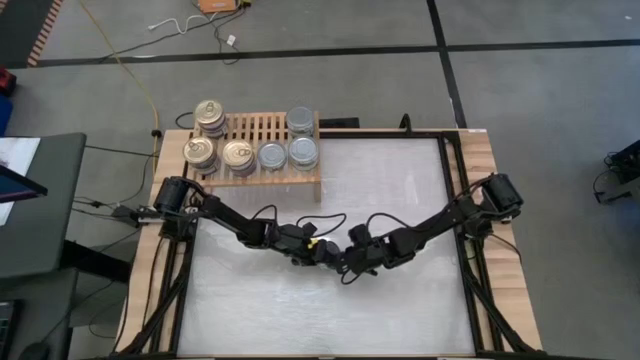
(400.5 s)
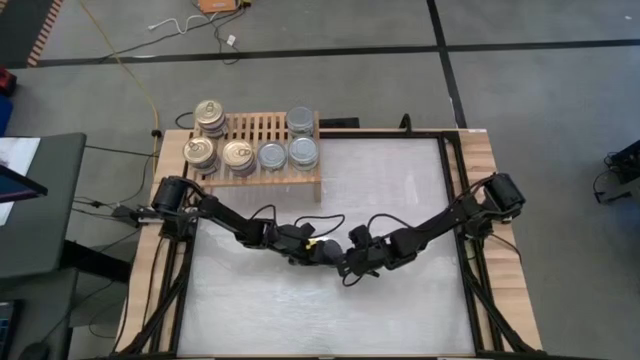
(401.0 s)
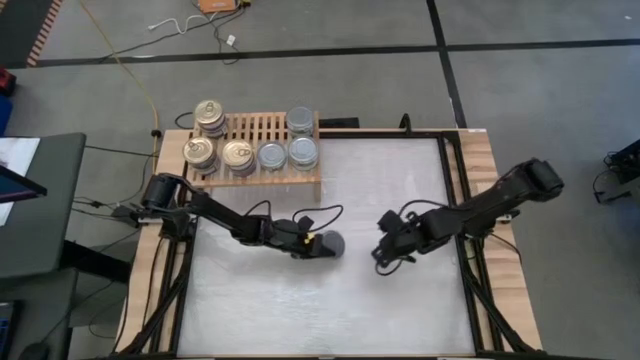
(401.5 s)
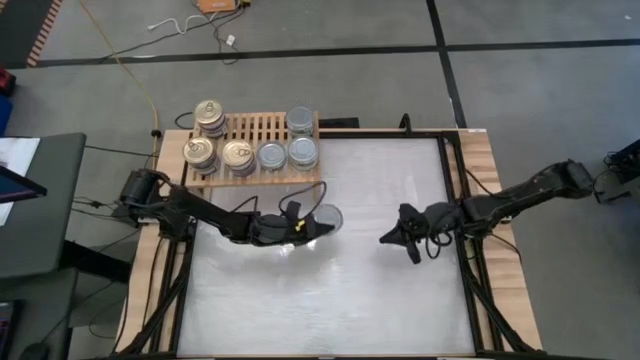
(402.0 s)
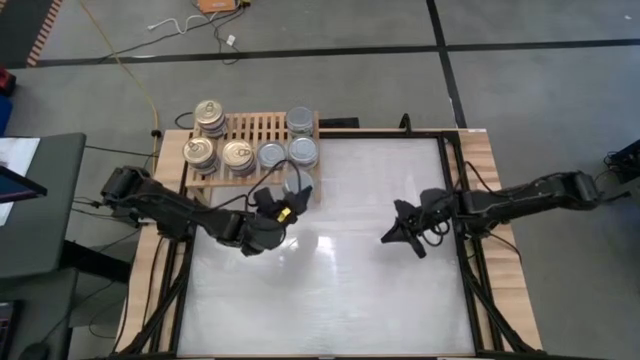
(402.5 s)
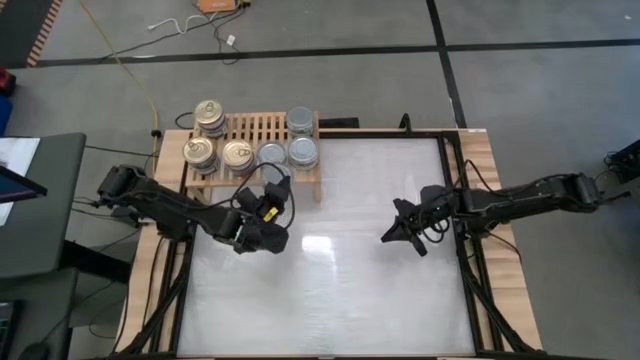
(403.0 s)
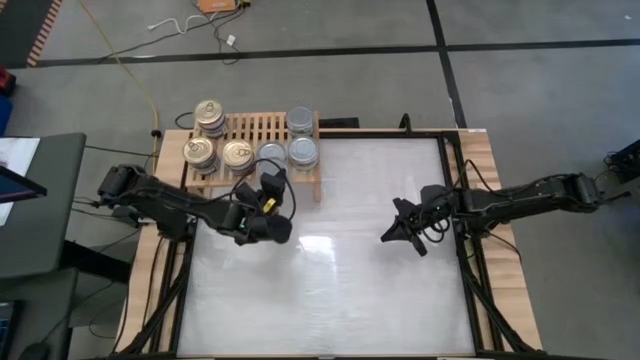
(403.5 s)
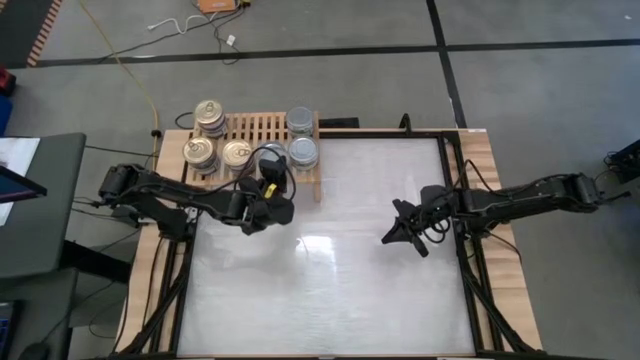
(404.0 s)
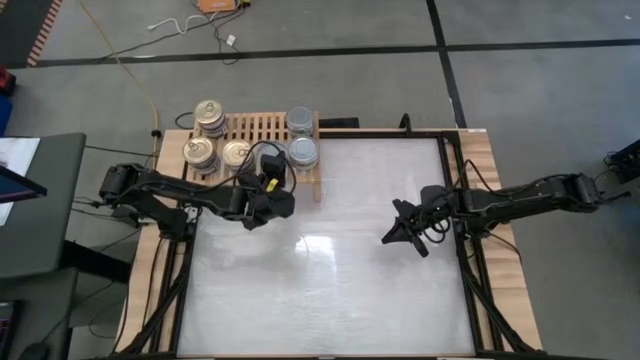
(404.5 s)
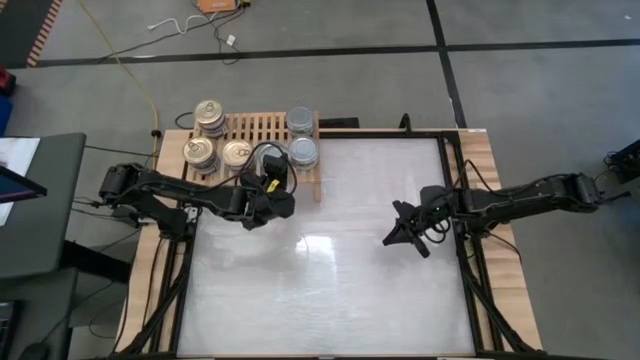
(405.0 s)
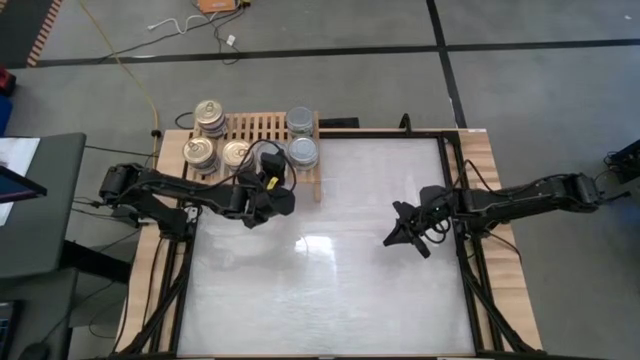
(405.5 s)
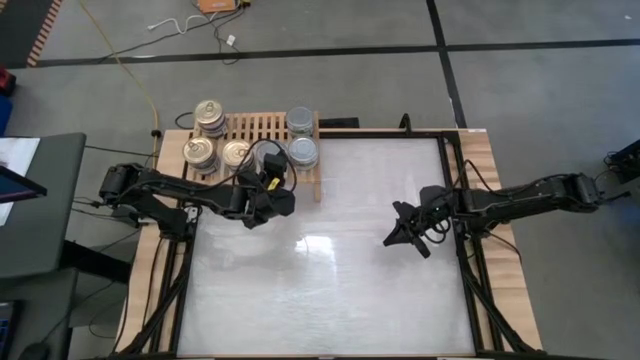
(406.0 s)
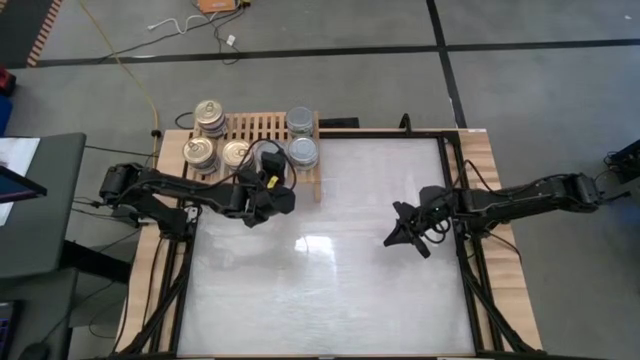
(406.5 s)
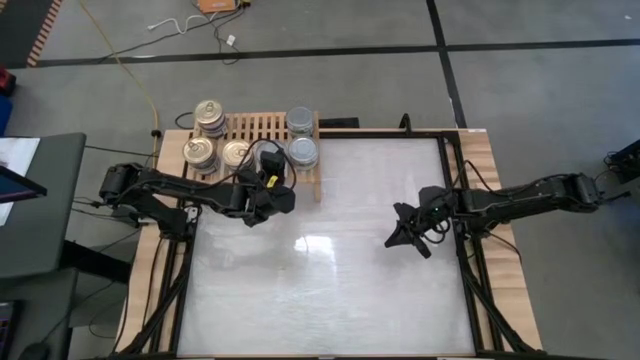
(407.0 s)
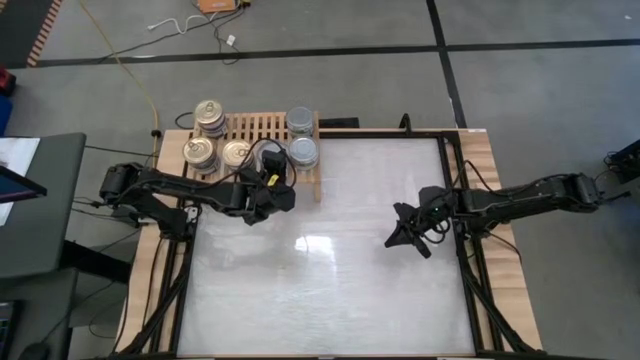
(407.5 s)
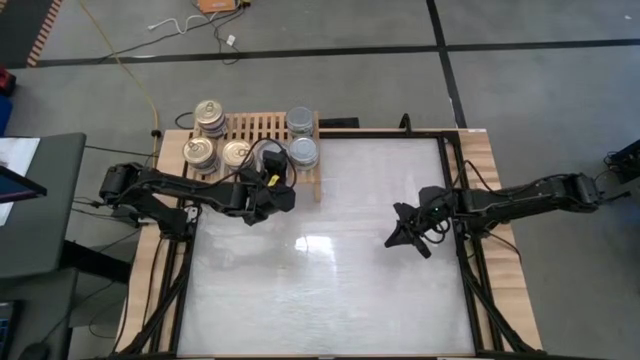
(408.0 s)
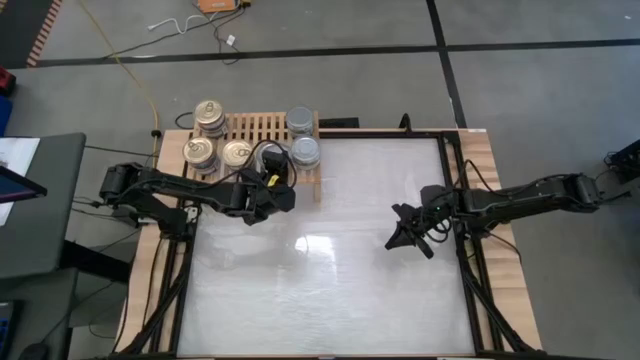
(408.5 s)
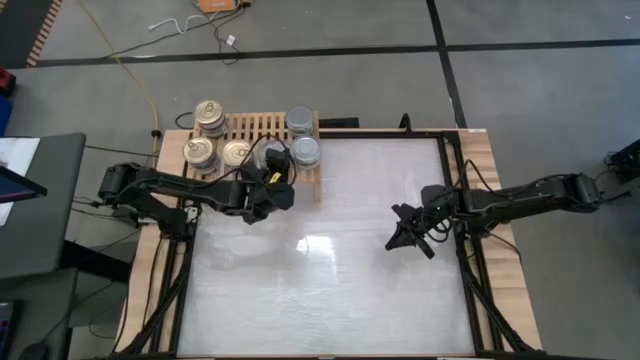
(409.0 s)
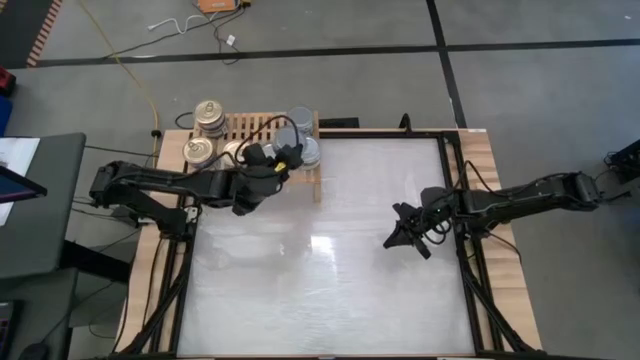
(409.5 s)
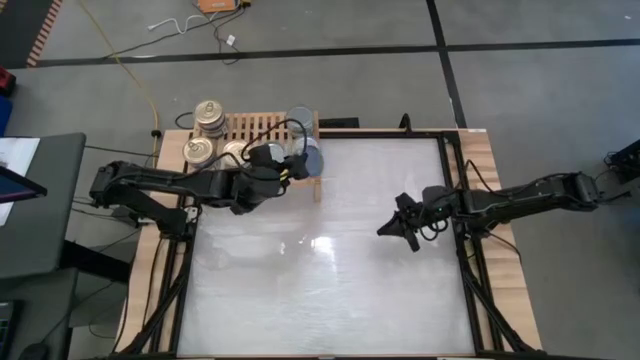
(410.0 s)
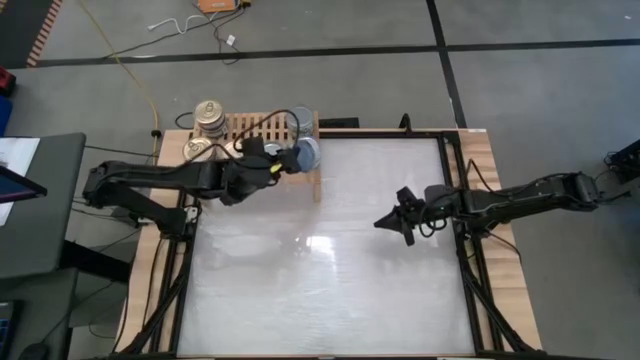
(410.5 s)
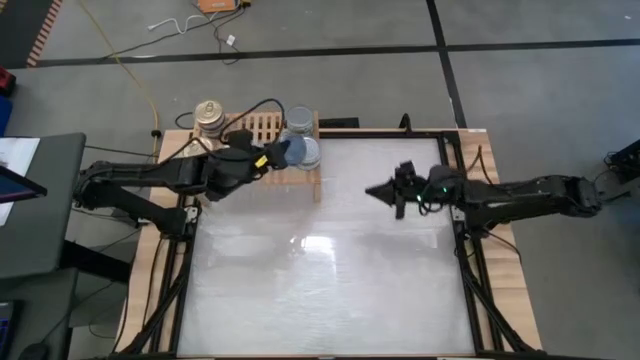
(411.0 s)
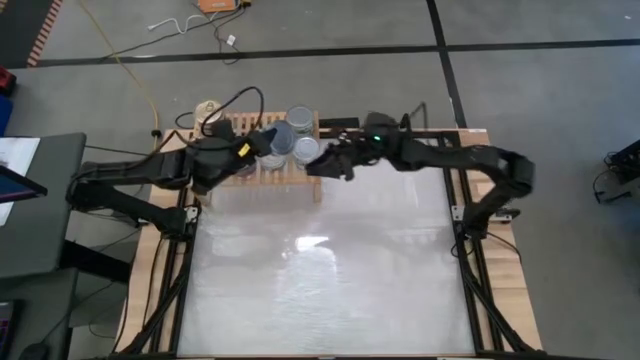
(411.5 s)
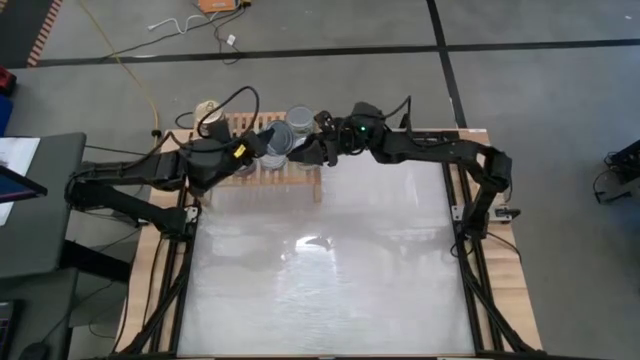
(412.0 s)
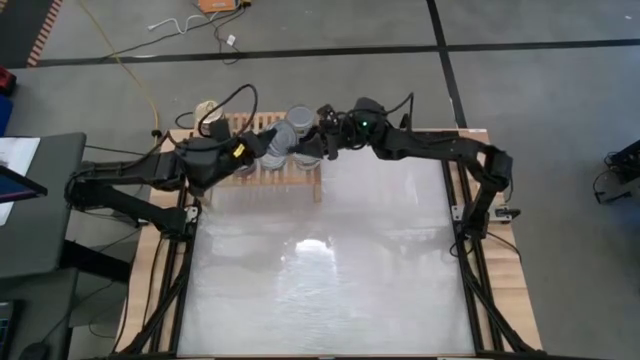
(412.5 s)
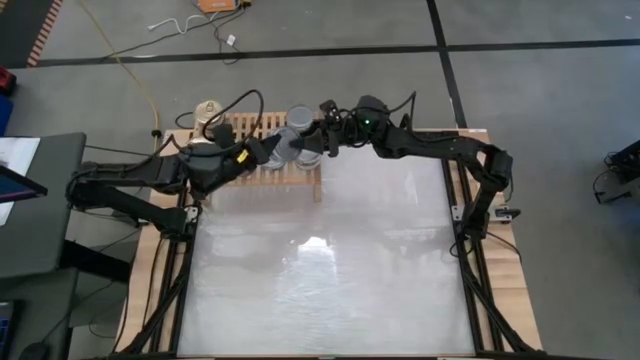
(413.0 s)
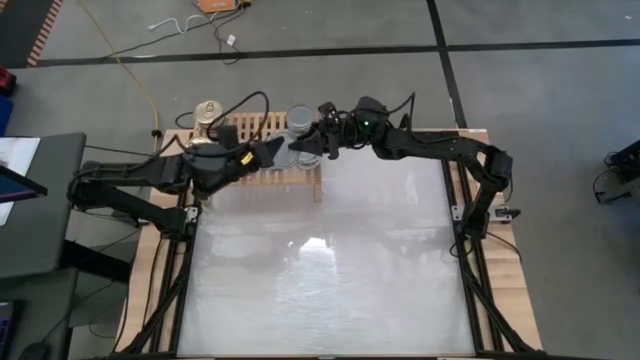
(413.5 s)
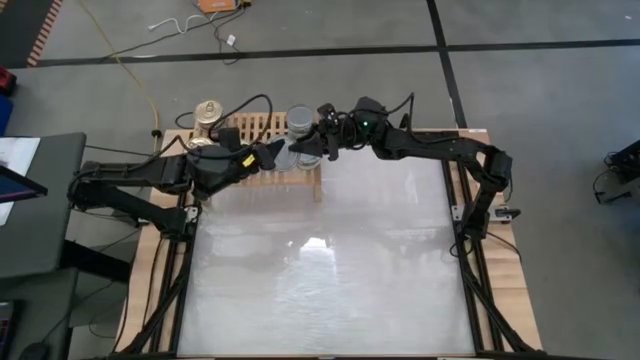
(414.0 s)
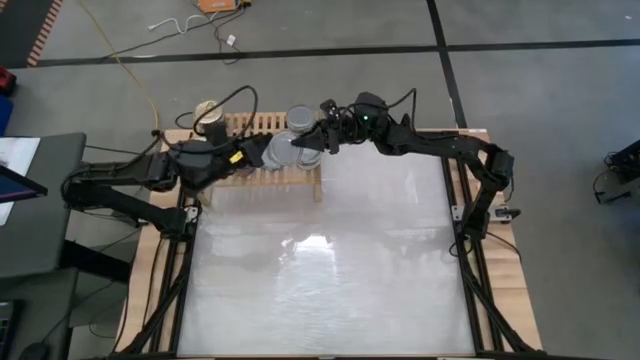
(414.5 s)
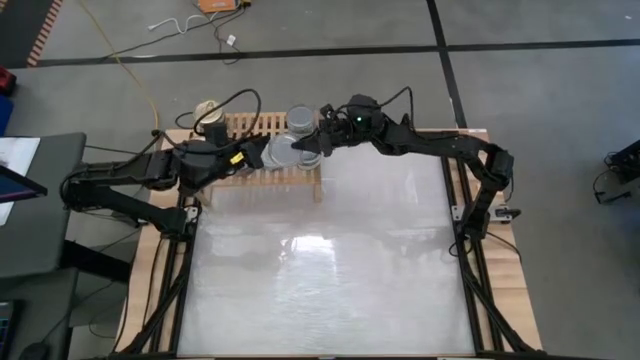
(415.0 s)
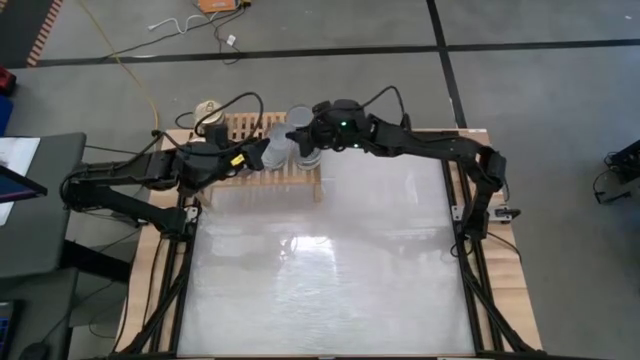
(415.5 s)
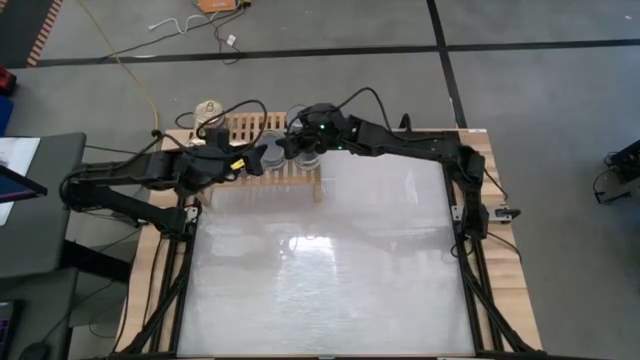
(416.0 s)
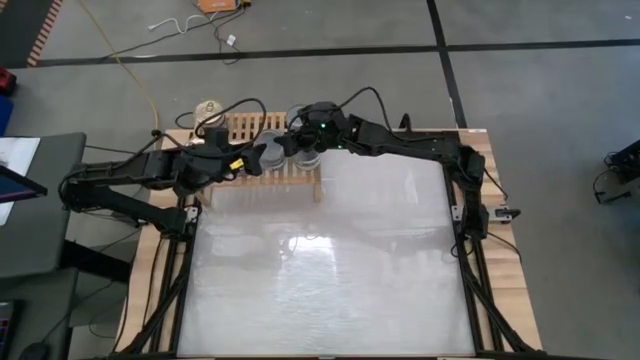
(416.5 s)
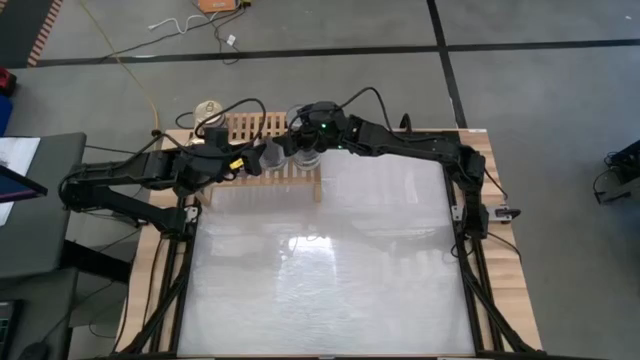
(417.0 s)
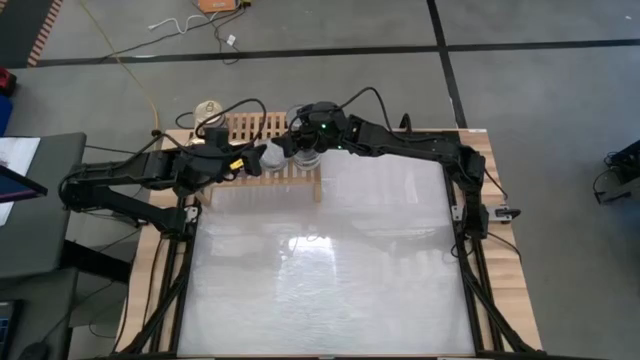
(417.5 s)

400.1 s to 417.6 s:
Task: Stack canned seafood by type on shelf
Stack the green tuna can on top of the bottom left green tuna can on the shelf

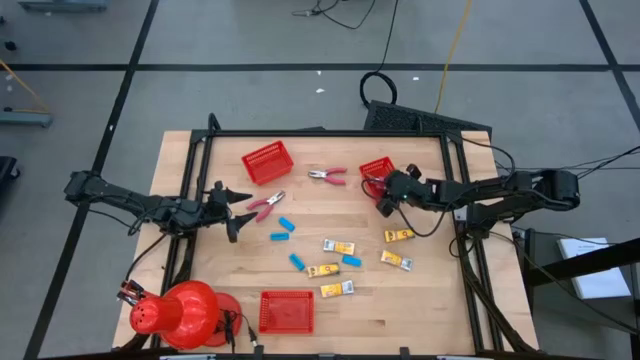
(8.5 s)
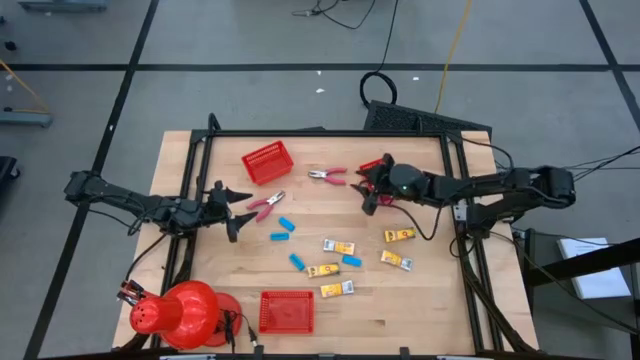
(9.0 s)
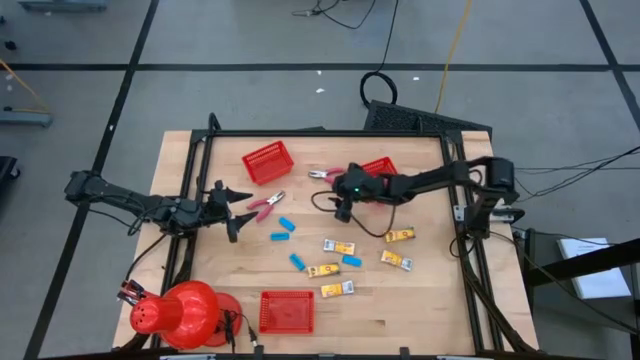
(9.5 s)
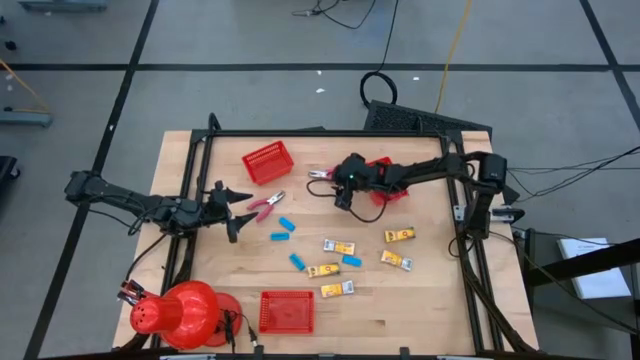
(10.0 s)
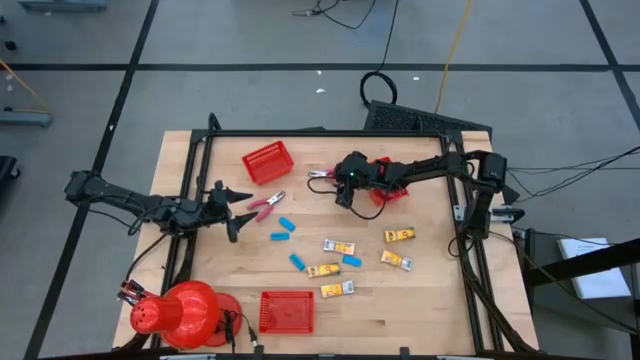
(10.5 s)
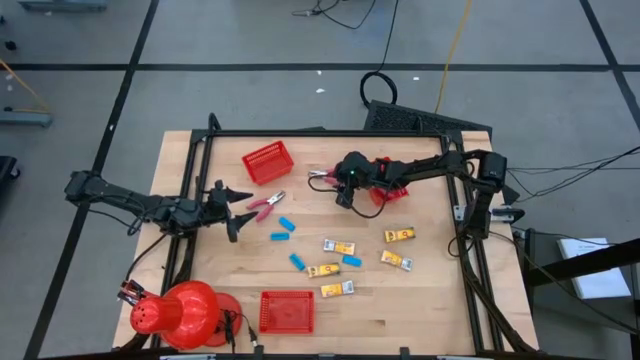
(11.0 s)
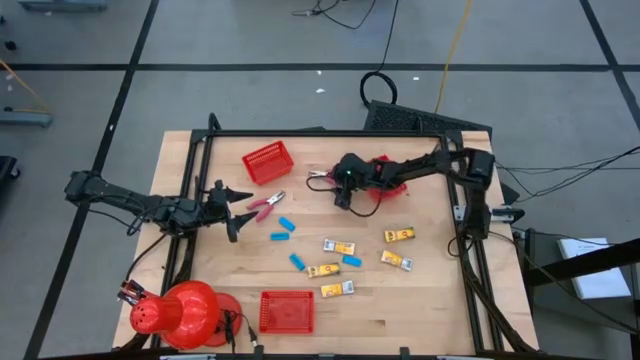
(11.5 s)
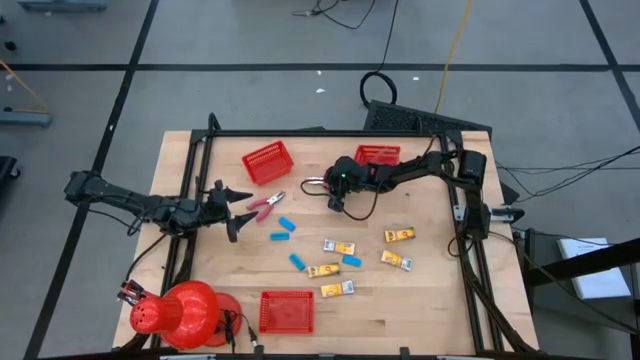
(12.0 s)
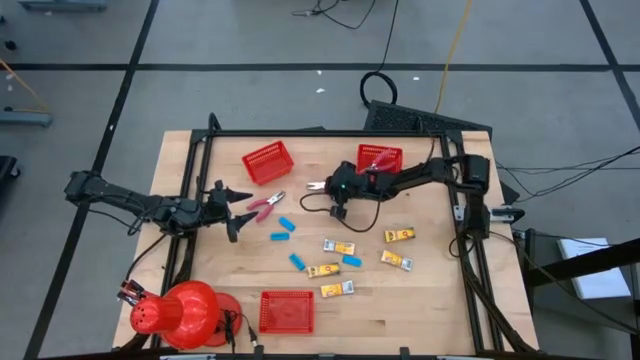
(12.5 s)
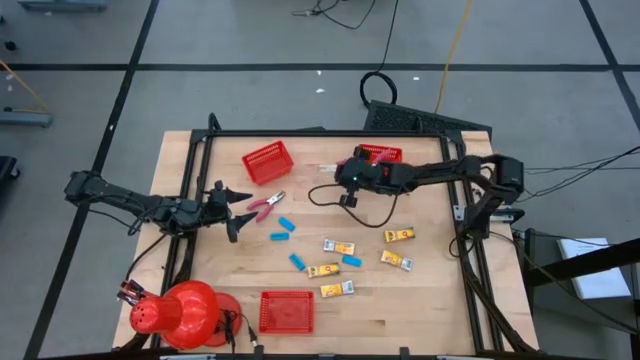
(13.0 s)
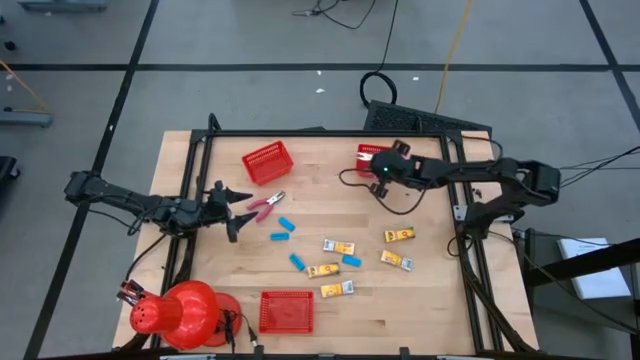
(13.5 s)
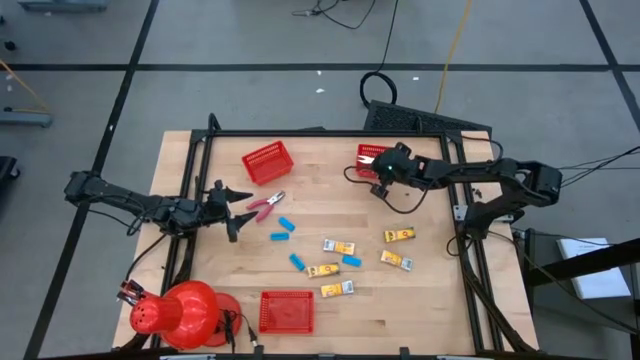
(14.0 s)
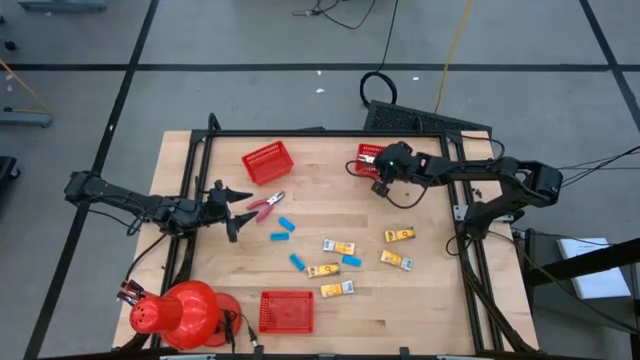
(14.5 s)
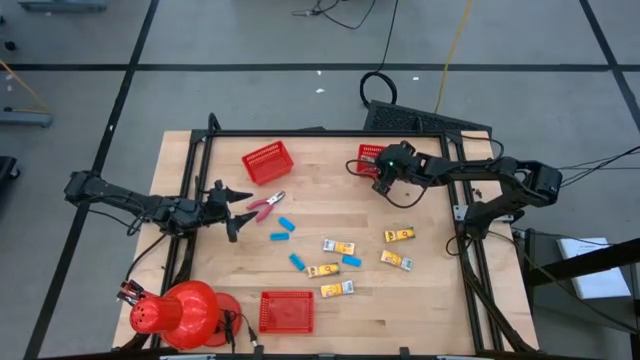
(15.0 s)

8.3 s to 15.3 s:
Task: Pick & Place School Supplies
Put the pink hole puncher into the top right red bin
